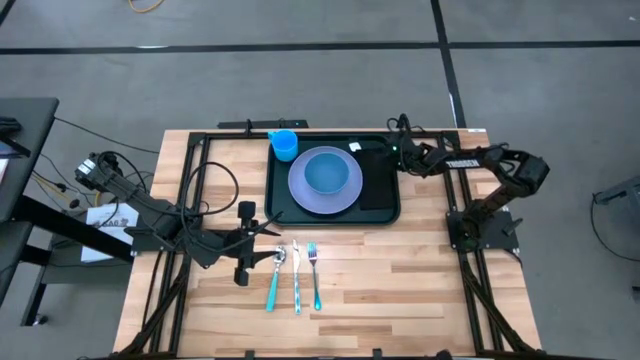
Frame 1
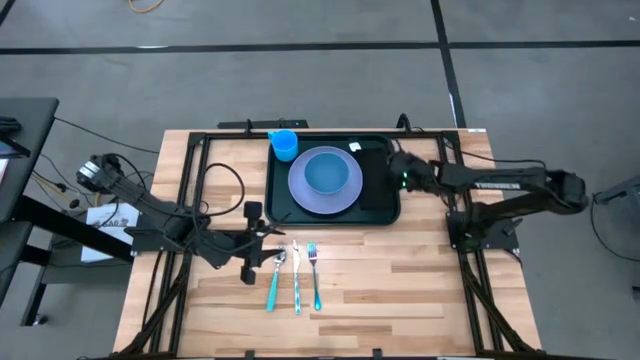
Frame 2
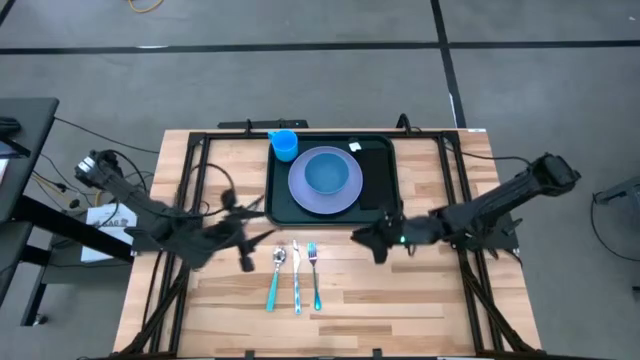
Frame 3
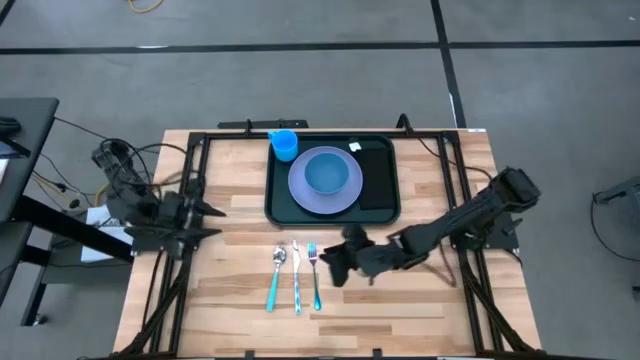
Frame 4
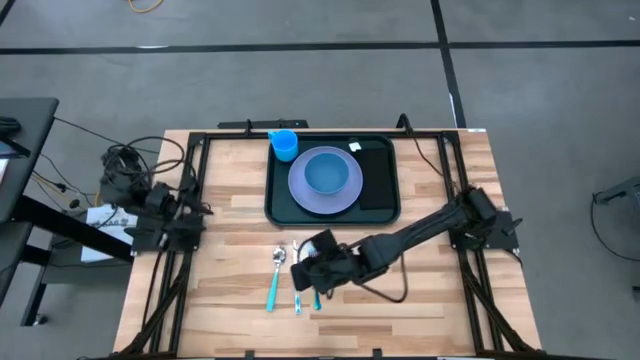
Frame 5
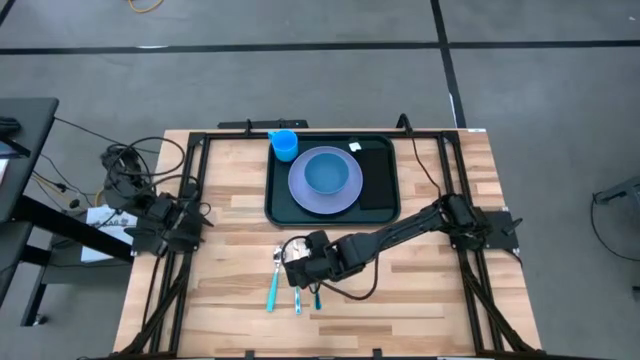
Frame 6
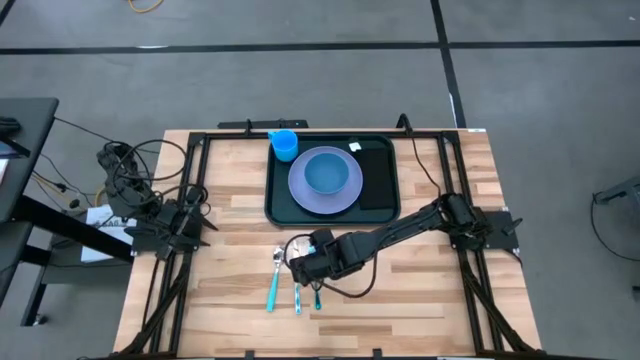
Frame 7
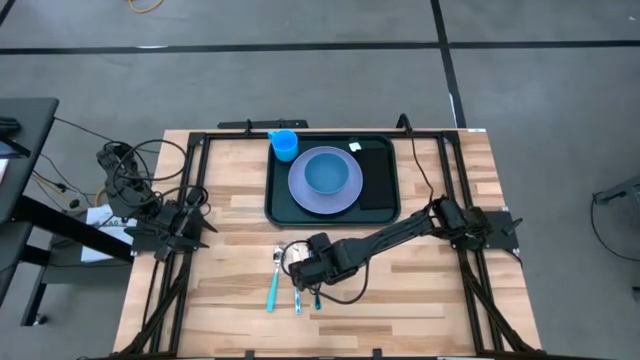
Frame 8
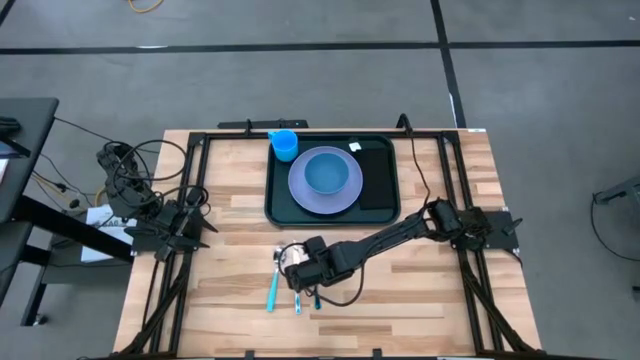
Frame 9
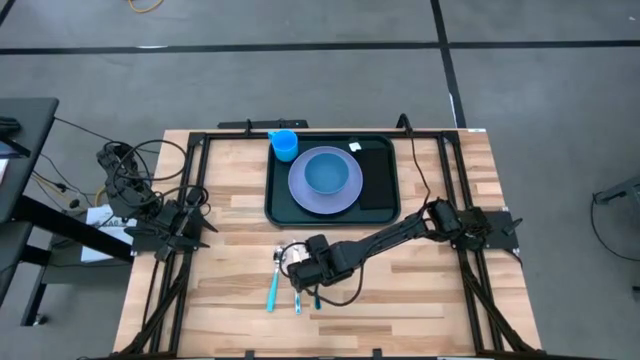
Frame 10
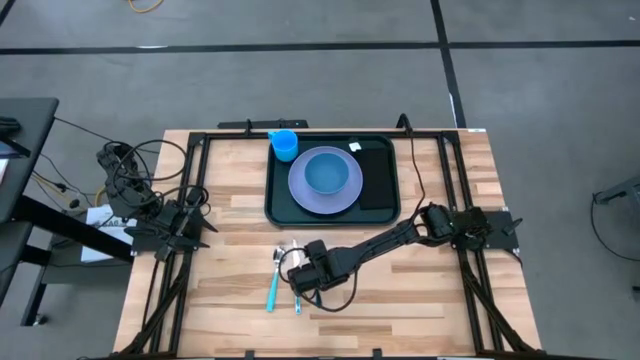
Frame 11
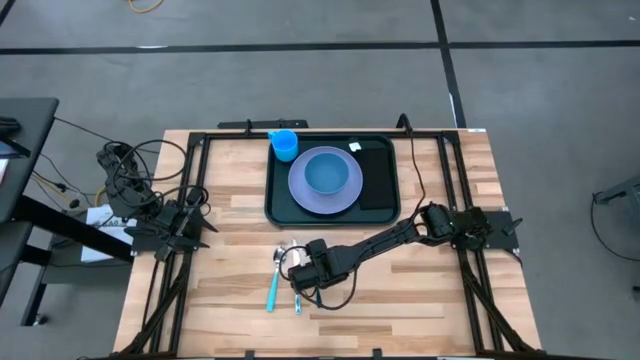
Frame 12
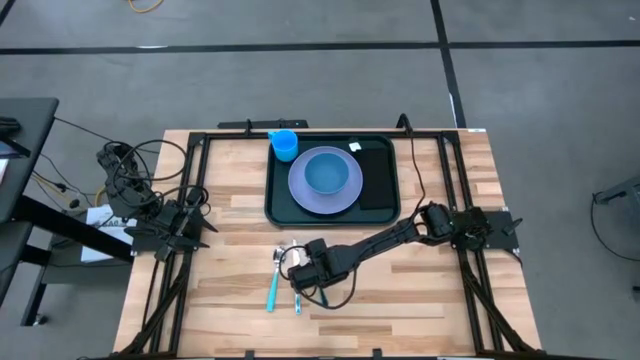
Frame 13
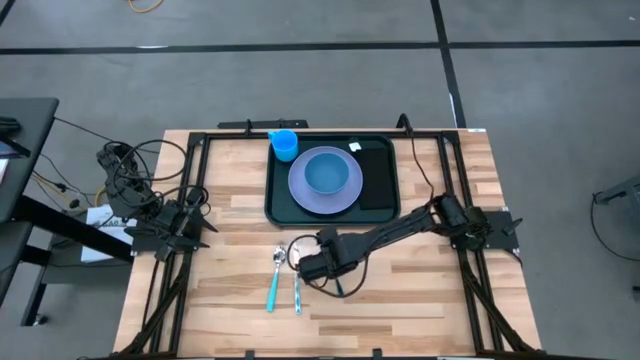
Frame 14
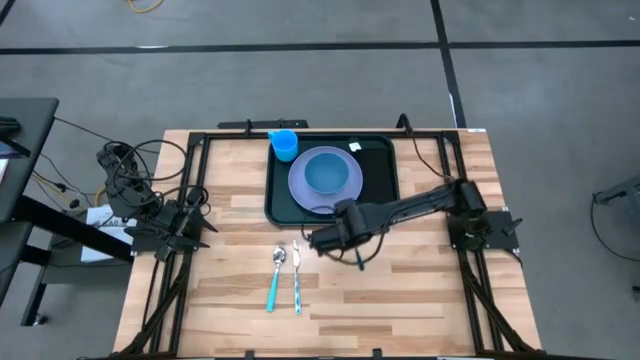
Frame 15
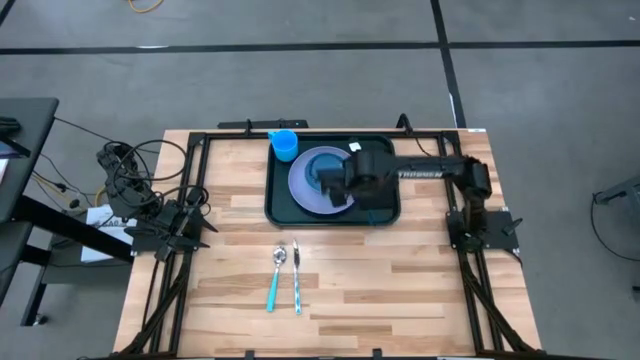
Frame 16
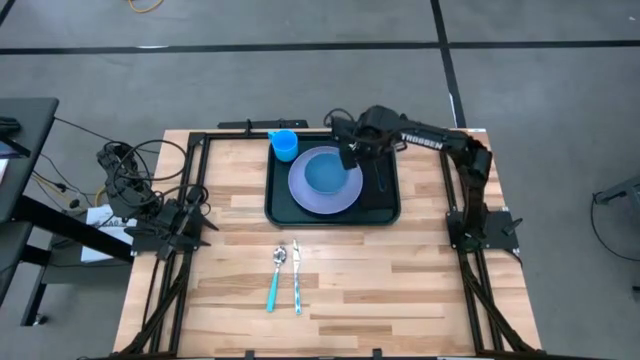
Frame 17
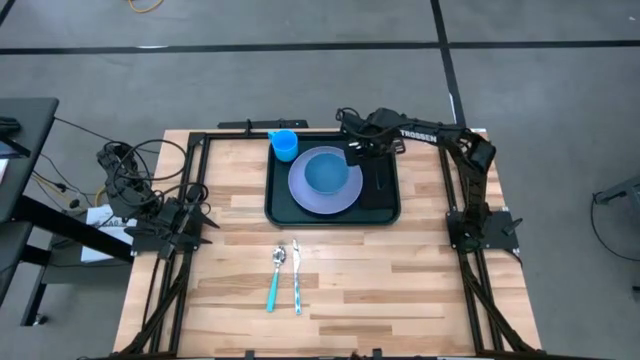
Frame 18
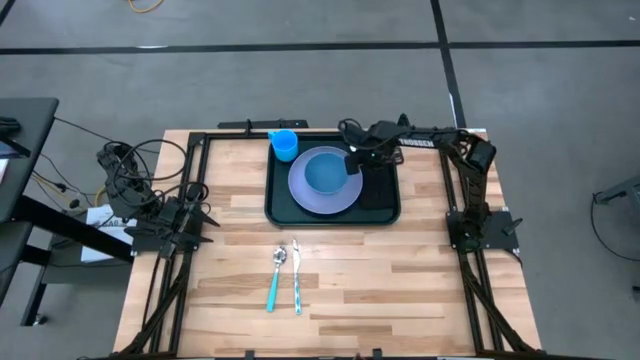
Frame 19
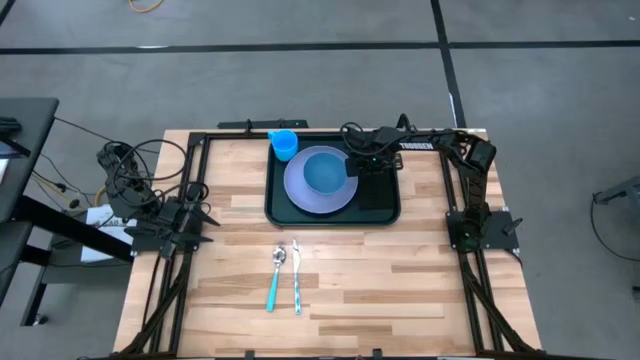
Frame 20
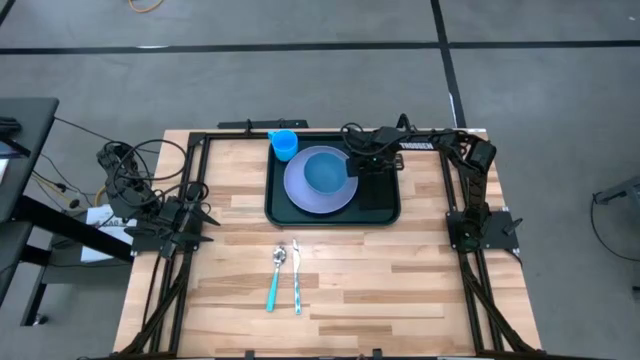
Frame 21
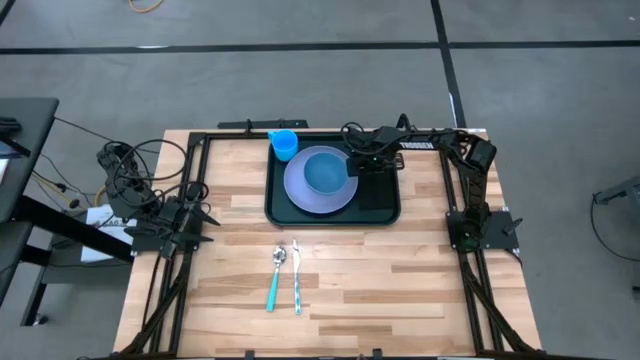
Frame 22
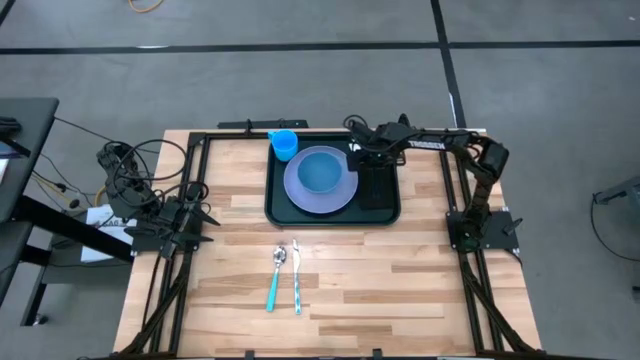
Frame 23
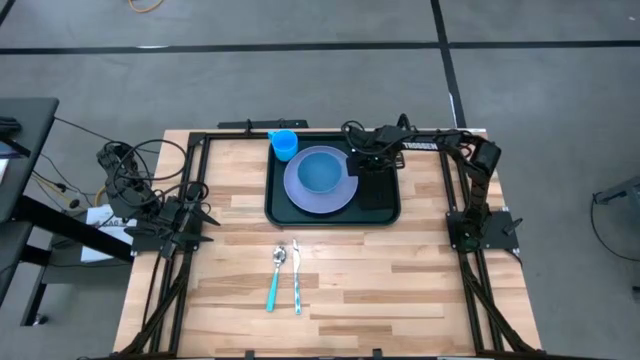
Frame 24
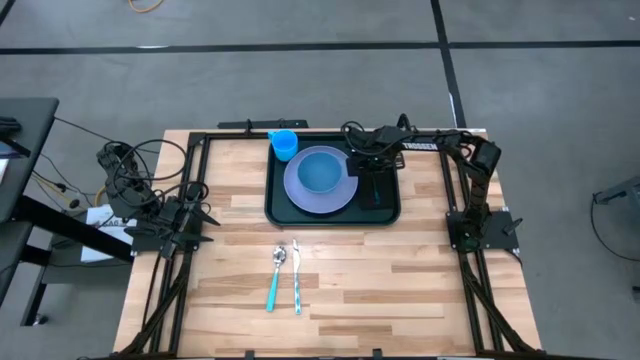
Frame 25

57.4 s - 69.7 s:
Task: Set up tray
Put the fork on top of the table napkin to the right of the purple plate on the tray

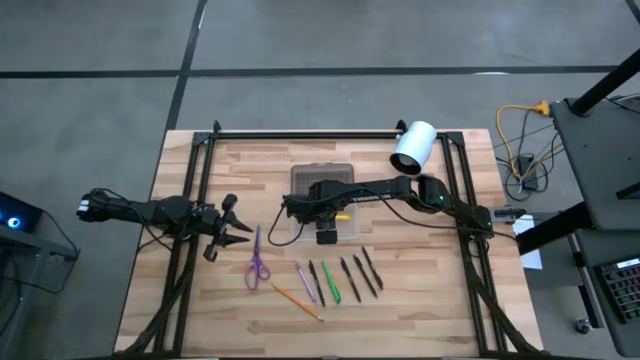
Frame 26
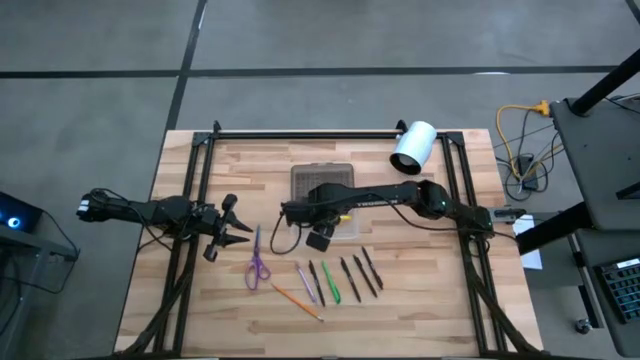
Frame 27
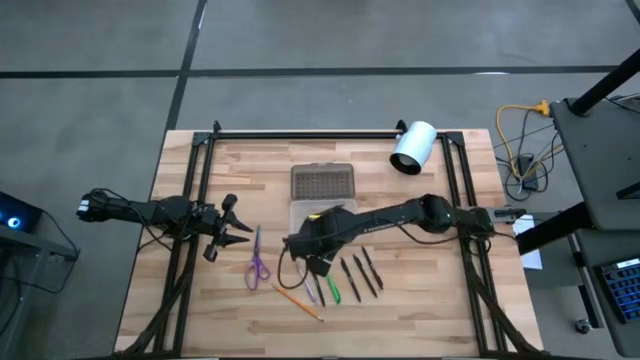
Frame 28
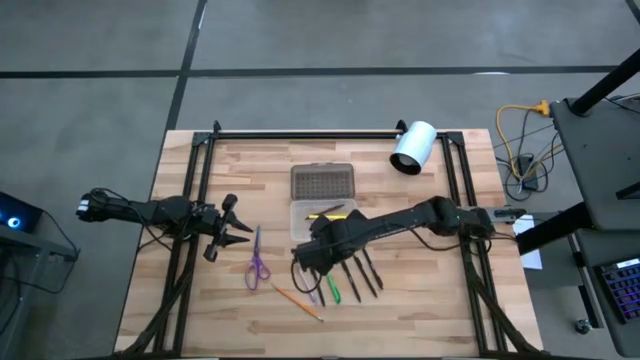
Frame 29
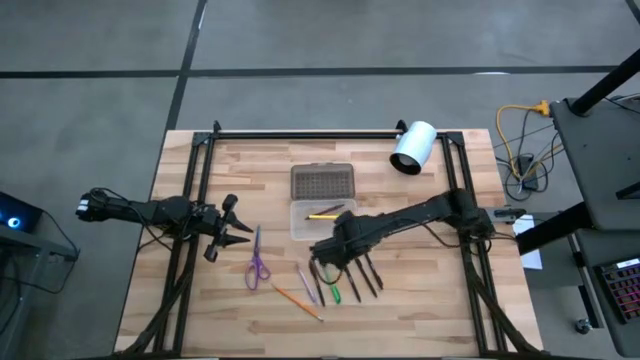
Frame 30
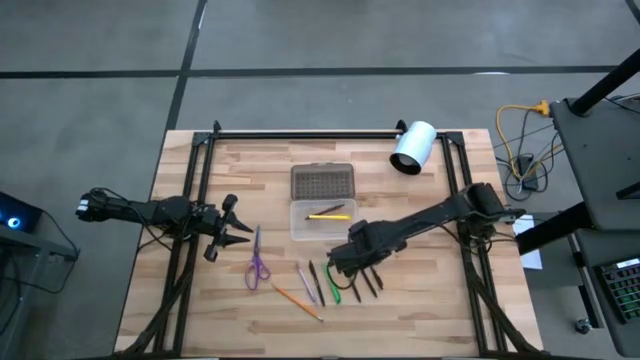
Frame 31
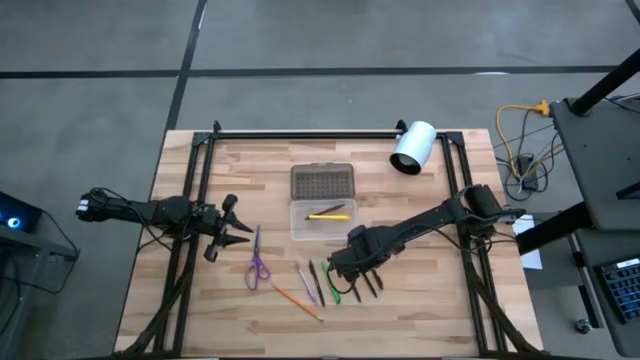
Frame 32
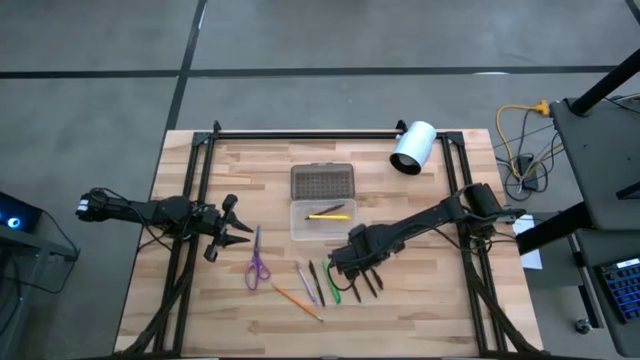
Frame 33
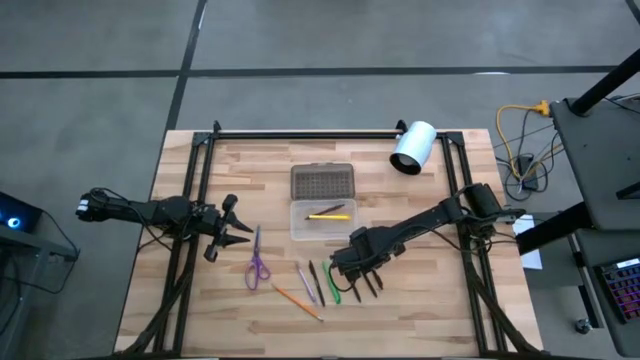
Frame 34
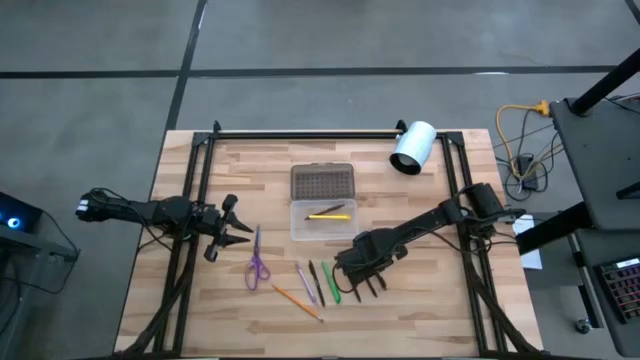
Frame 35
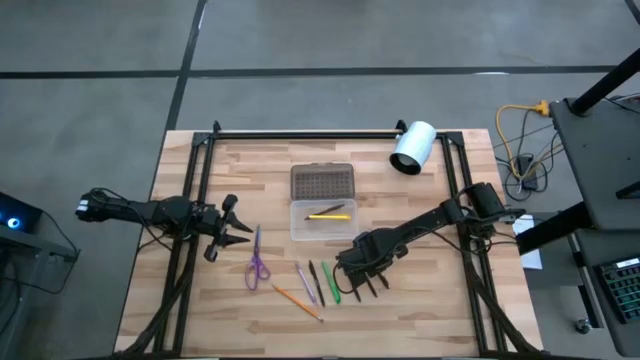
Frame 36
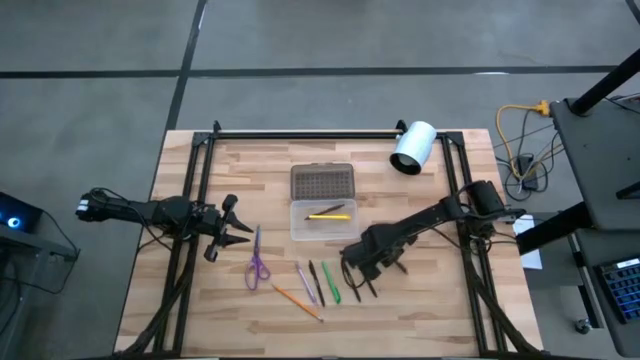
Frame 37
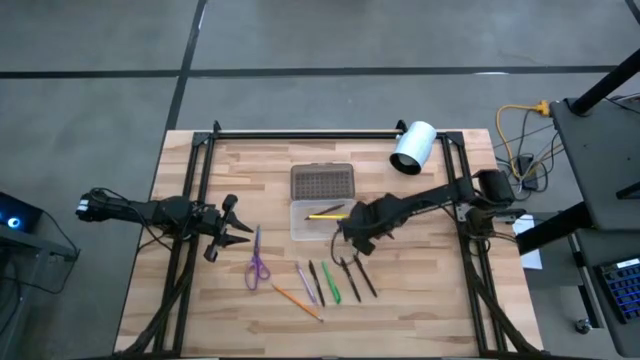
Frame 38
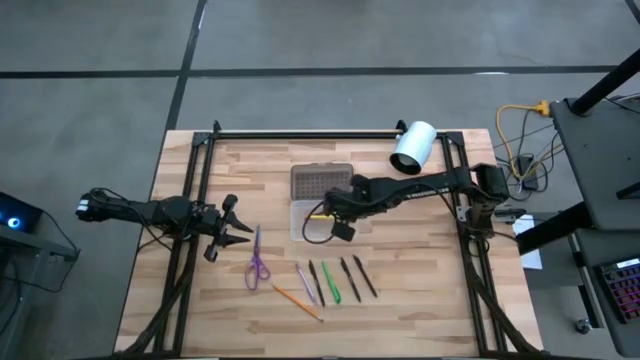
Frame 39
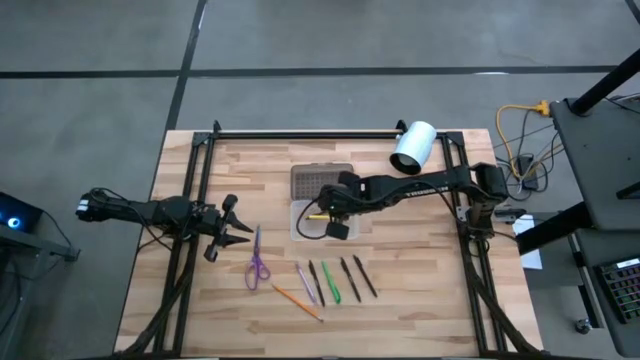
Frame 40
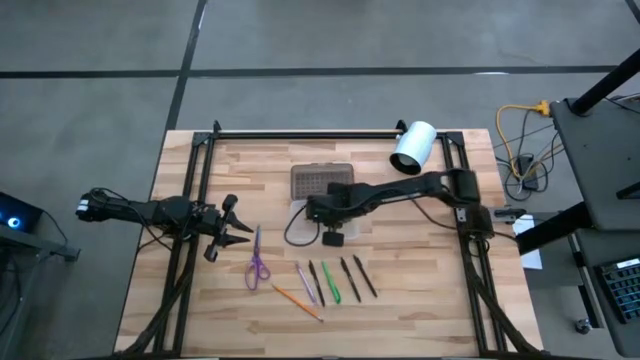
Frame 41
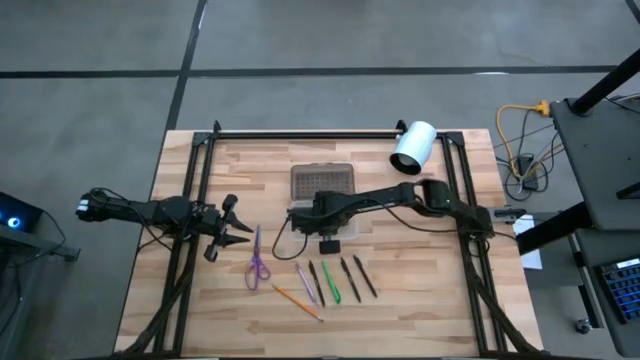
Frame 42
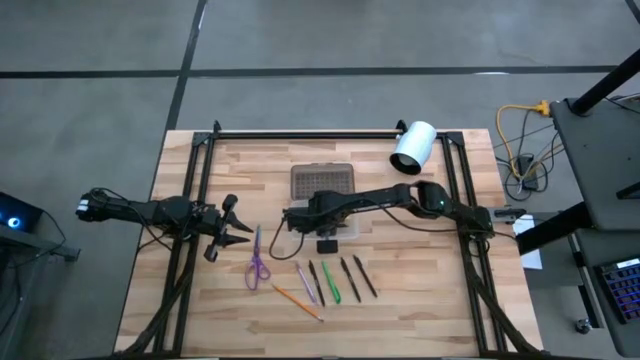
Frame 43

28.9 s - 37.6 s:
Task: Pick & place school supplies into a supply box
Put the black pen into the supply box
